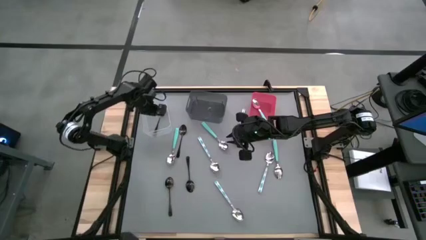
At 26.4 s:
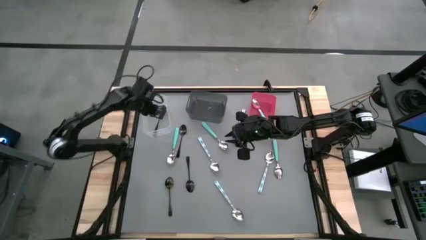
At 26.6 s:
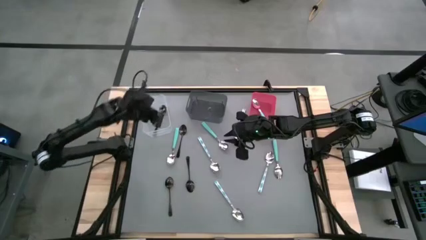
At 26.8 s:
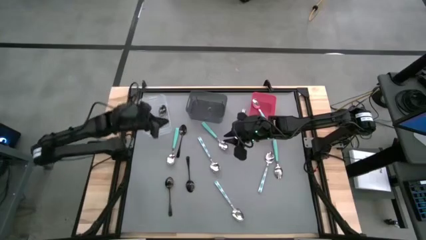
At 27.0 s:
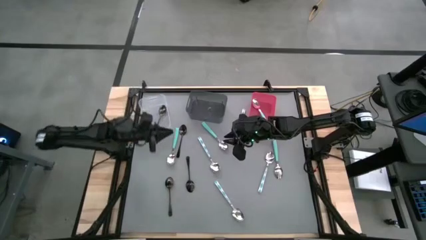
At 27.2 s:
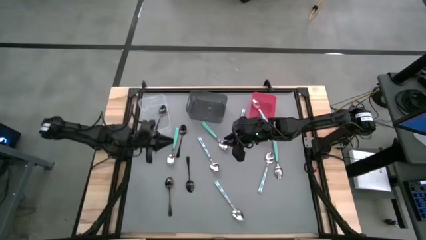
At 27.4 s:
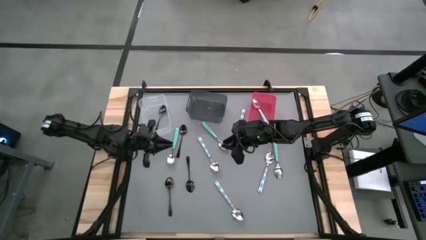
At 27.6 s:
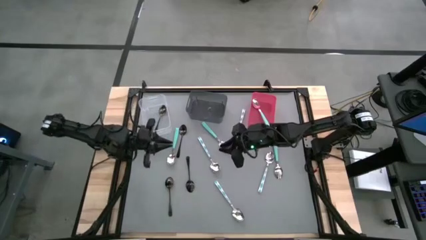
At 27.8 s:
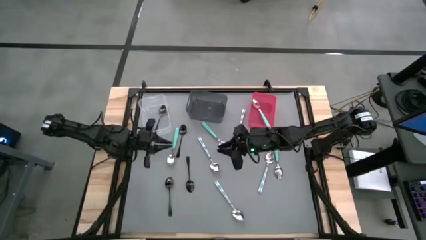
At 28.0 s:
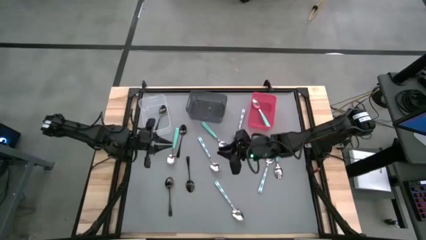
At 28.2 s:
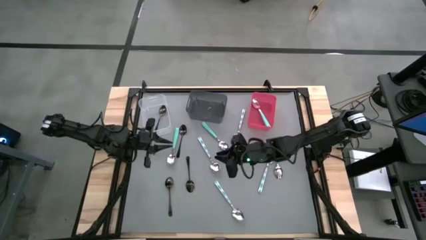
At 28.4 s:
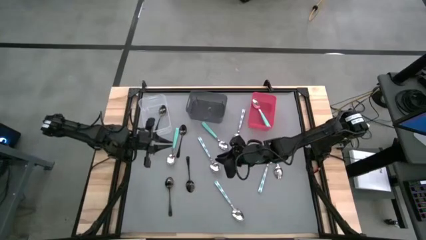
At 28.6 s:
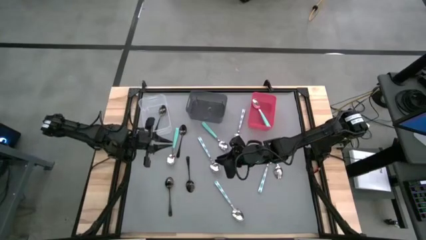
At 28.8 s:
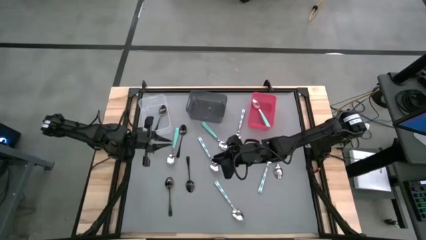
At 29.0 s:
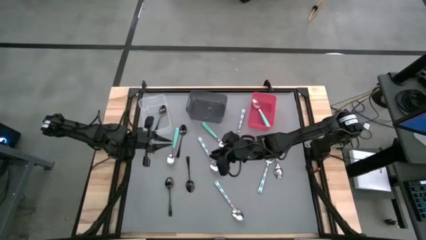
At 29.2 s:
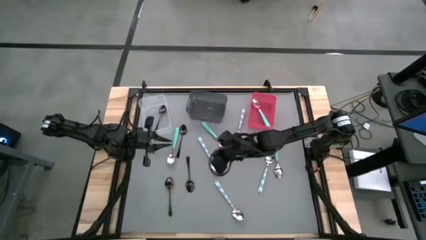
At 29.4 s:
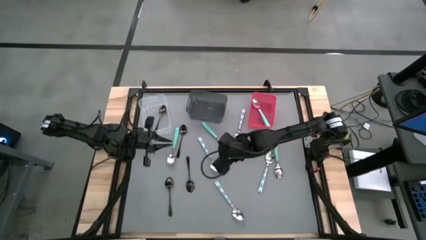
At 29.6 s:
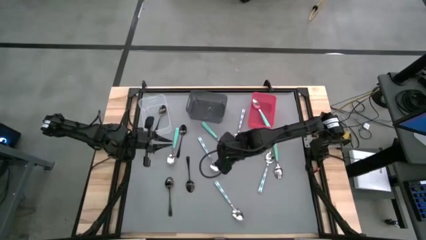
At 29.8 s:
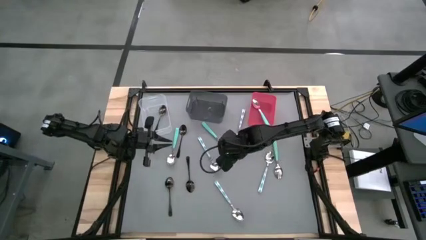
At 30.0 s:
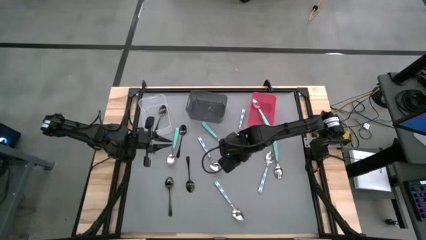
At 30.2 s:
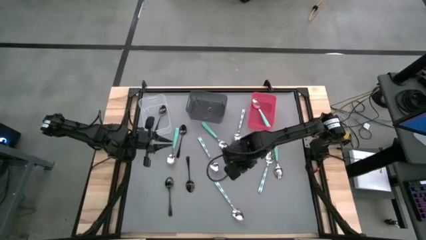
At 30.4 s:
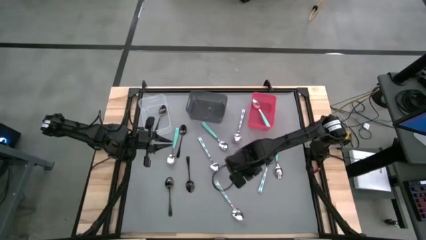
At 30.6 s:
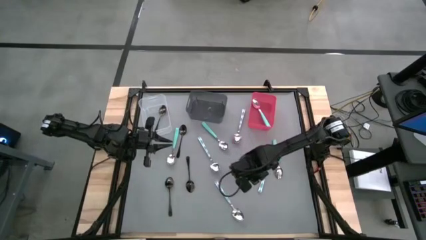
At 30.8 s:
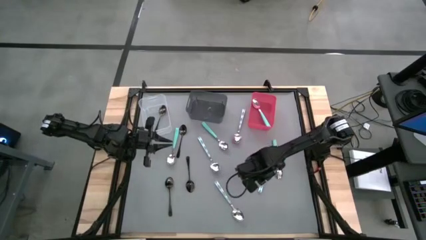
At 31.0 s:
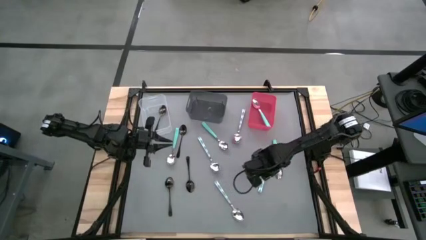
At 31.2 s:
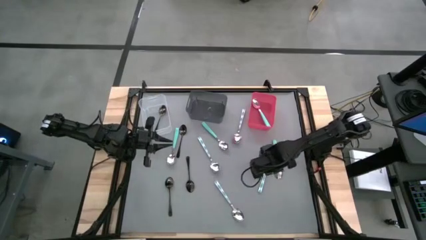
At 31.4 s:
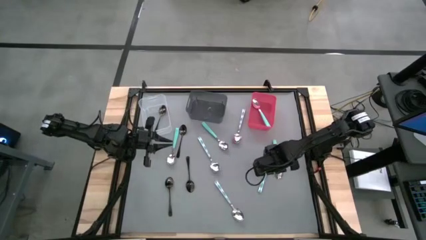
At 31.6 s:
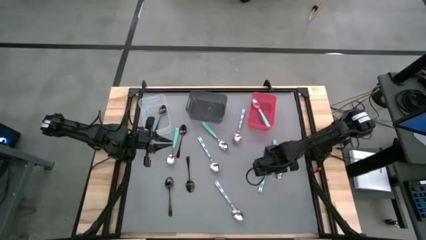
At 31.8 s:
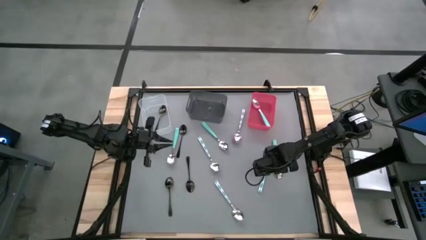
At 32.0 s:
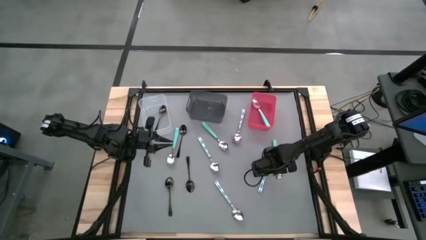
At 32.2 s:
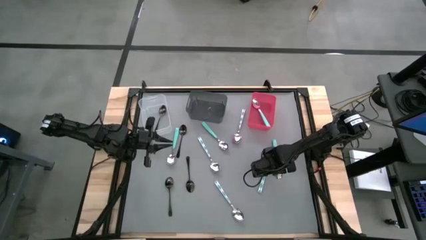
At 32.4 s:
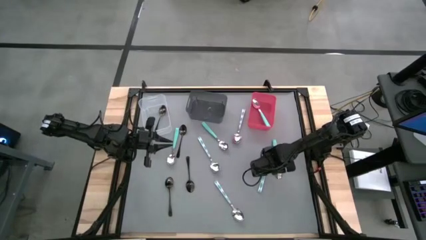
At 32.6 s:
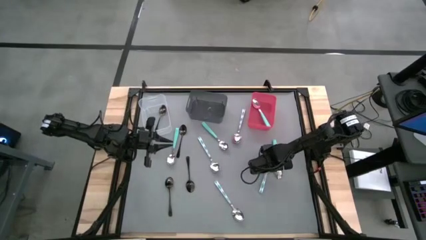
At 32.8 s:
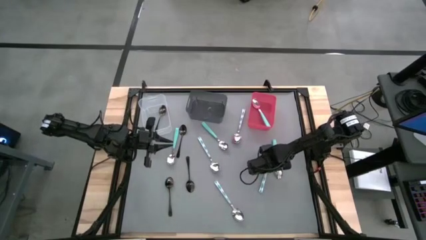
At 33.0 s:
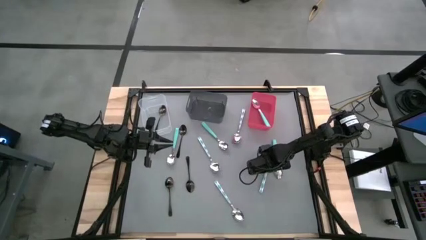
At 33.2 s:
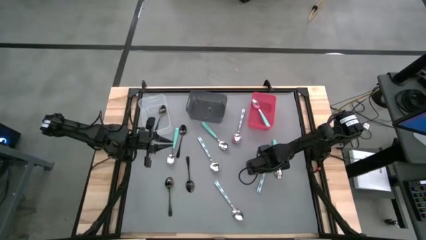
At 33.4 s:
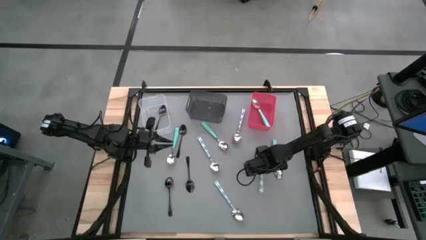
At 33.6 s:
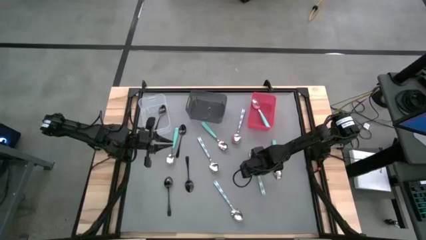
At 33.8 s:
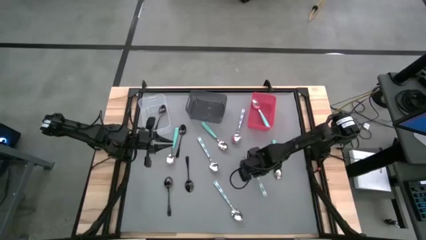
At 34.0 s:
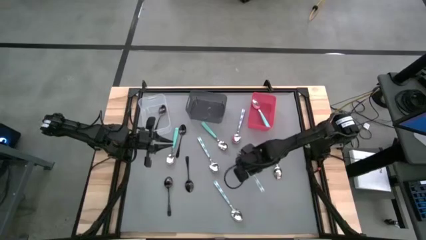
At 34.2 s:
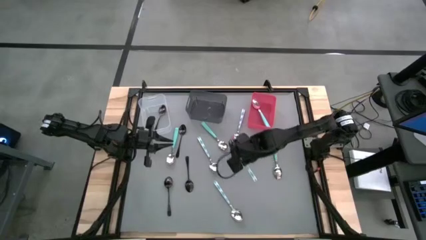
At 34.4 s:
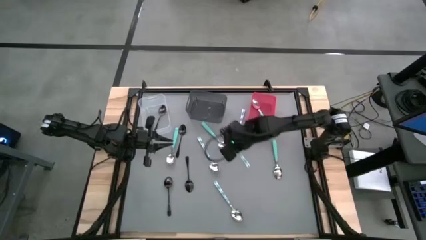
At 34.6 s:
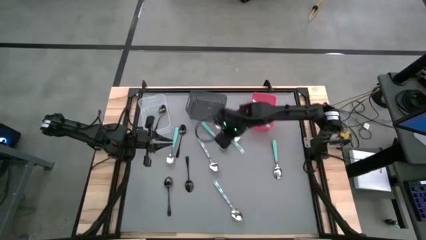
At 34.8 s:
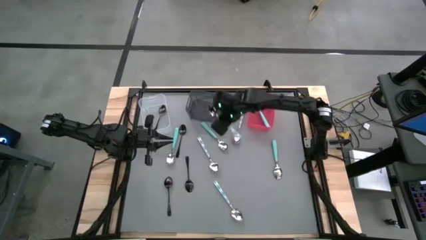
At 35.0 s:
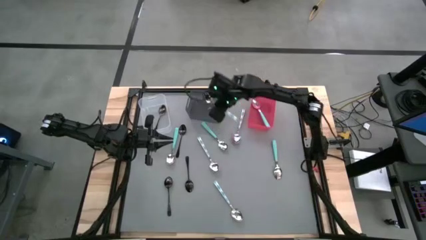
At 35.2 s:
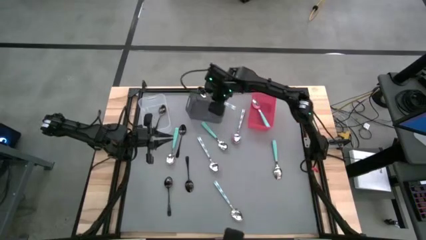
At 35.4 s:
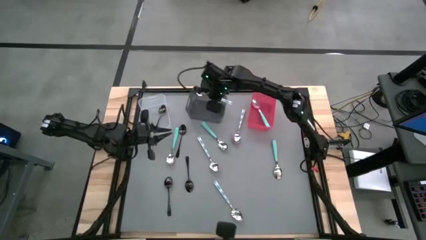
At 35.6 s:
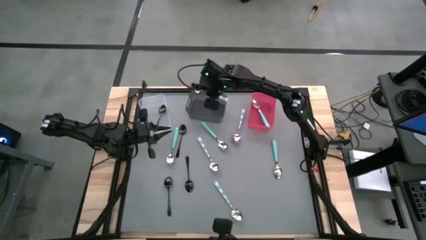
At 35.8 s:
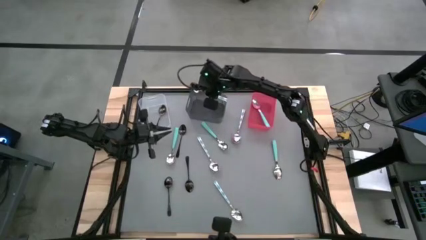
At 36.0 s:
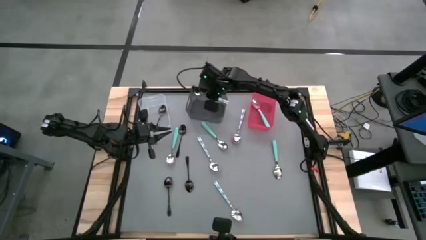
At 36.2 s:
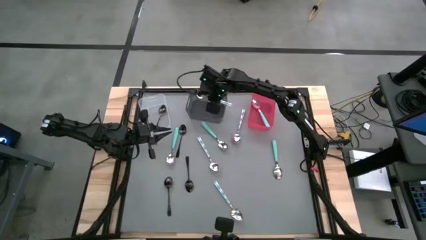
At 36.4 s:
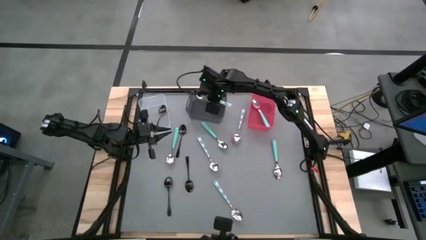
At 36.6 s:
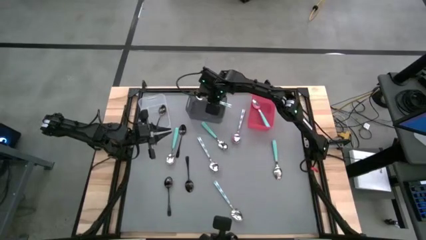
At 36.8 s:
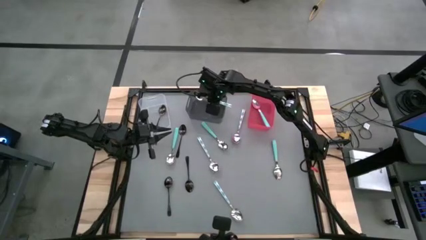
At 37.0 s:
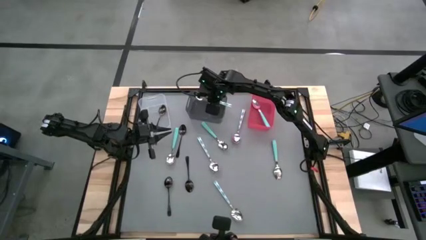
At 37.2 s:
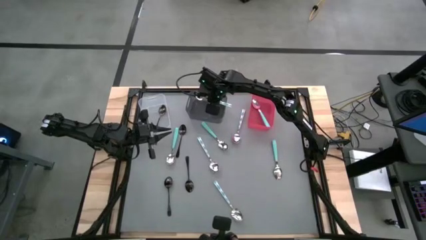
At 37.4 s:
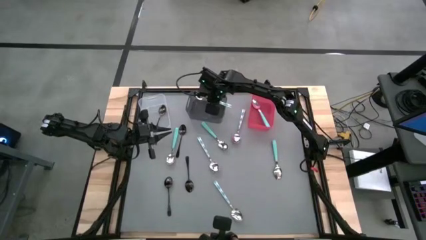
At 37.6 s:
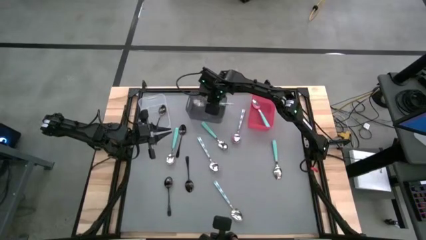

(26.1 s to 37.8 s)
Task: Sort silverware by color (type)
Put the middle right blue patterned spoon into the black bin

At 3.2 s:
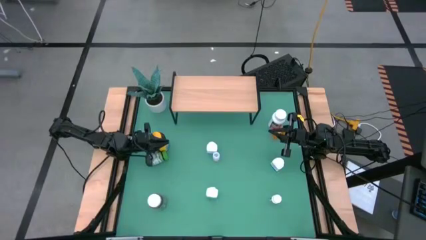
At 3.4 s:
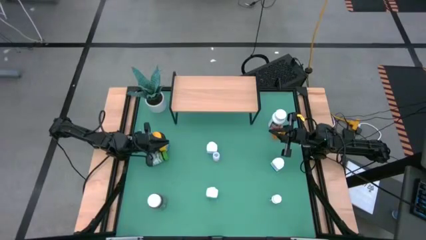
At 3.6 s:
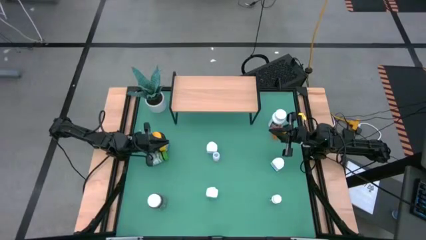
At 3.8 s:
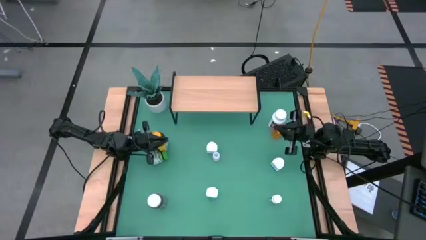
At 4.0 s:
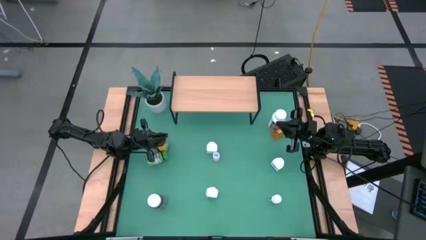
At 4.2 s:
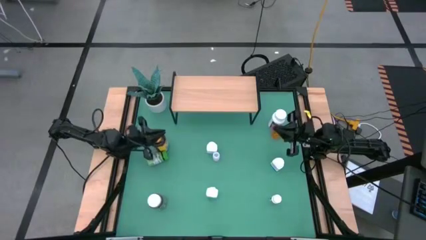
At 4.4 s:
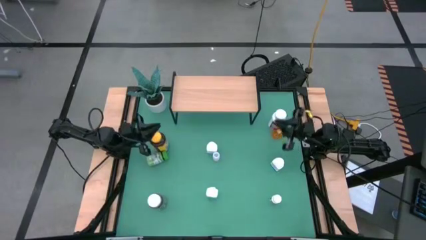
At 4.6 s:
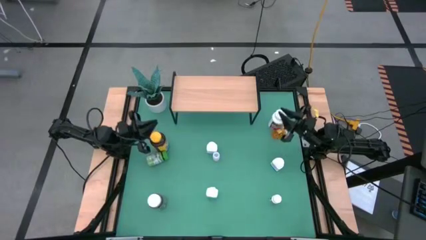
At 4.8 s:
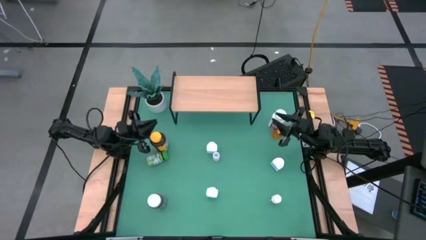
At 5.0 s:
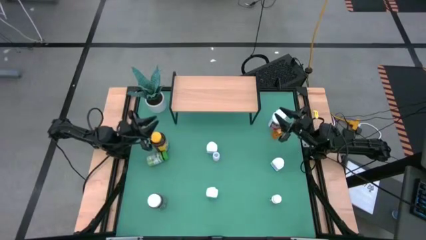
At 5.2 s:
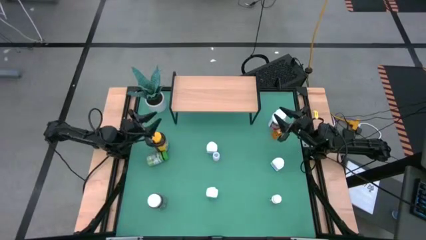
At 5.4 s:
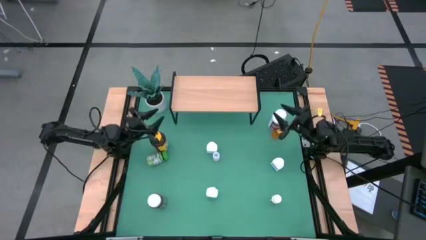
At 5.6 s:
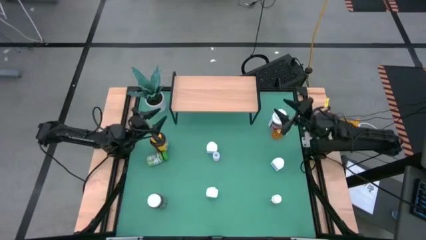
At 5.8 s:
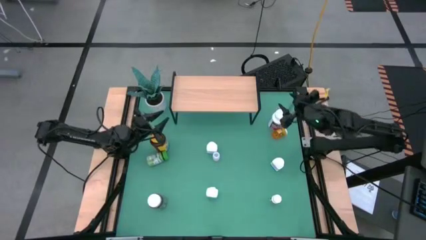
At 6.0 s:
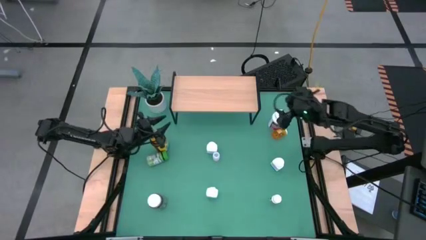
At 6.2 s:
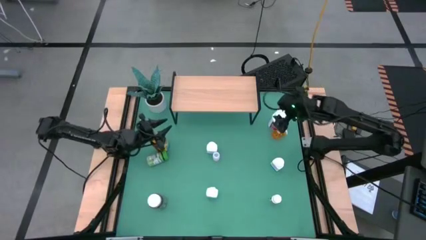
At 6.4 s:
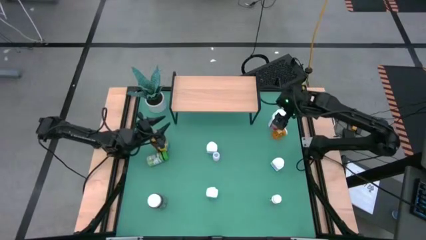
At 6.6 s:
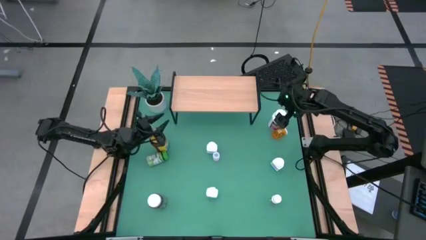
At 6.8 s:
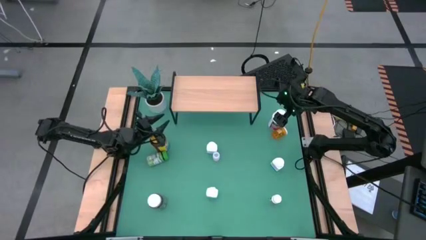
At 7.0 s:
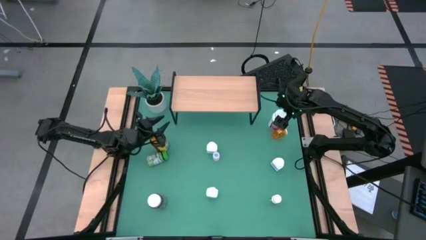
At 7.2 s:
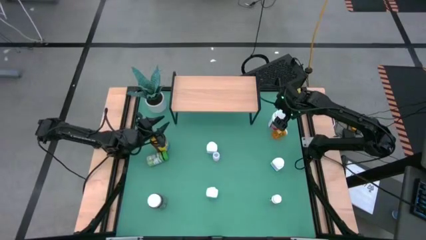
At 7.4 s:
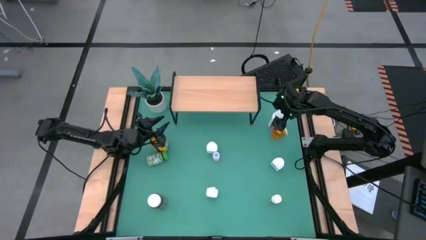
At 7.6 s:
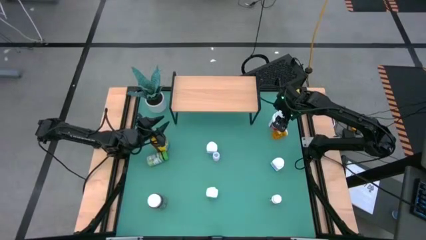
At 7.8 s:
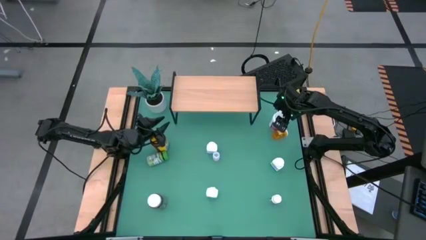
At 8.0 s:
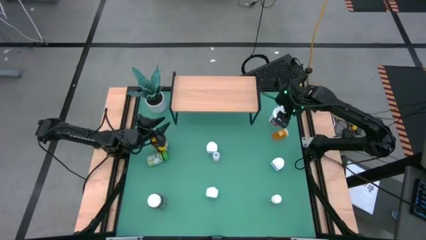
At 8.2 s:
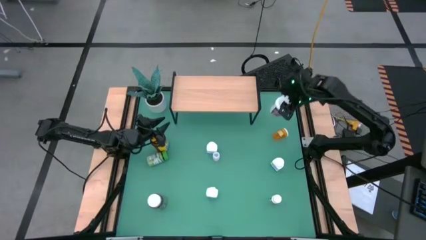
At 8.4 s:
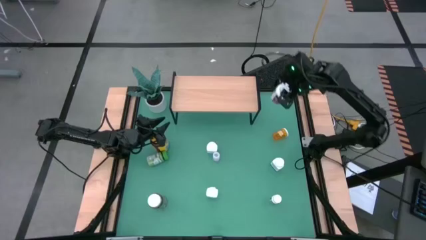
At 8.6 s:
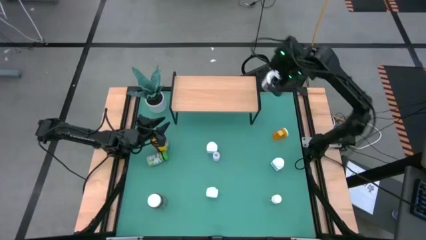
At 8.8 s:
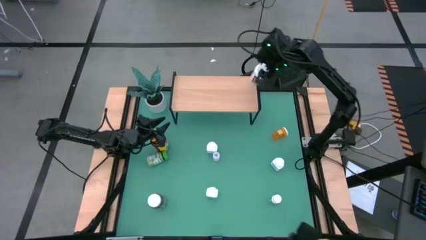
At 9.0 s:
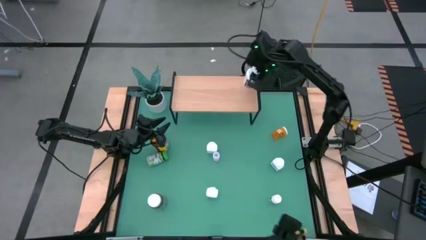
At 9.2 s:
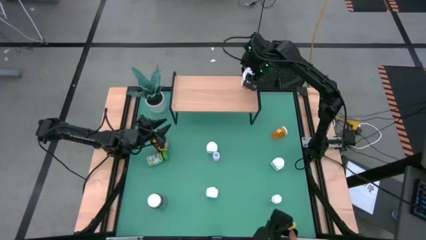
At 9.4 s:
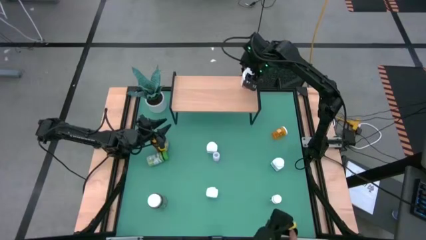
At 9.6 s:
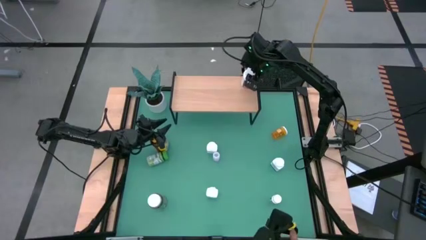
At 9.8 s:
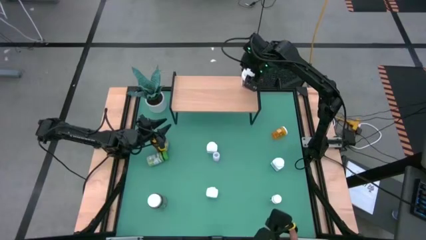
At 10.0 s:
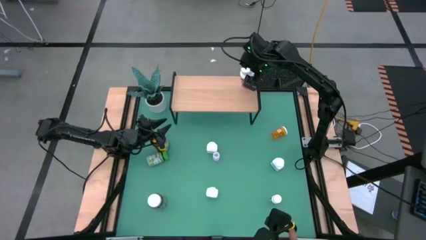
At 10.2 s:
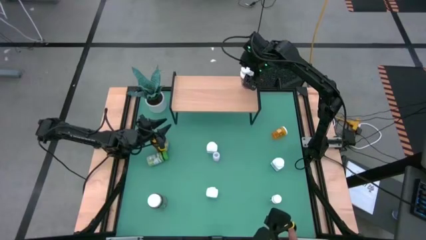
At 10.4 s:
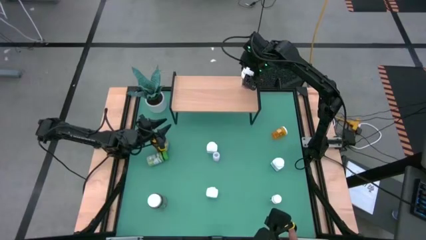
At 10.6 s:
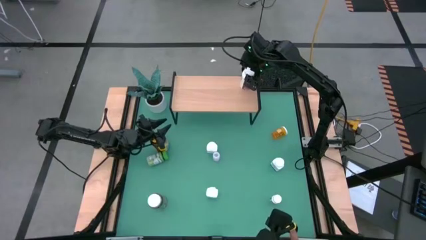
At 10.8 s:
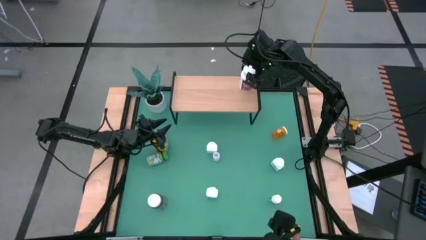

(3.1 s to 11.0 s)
Task: Pick and place medicine bottles onto shelf by color
Put the purple medicine bottle on the shelf
